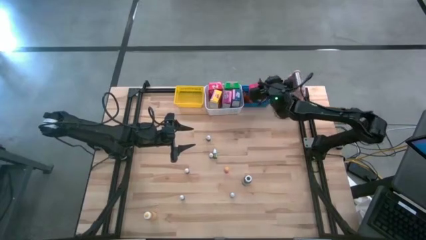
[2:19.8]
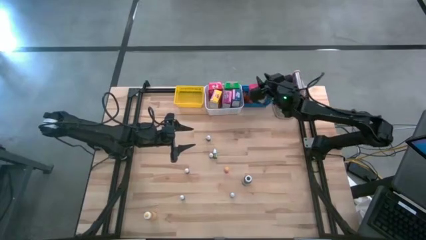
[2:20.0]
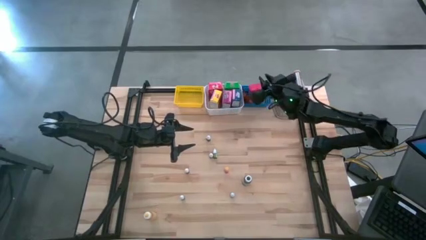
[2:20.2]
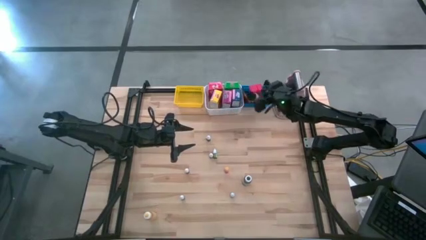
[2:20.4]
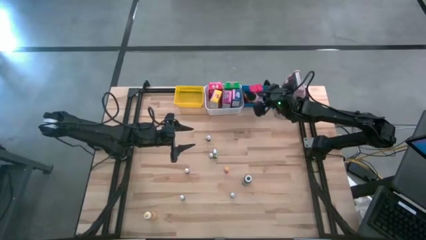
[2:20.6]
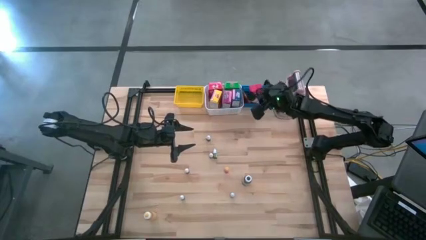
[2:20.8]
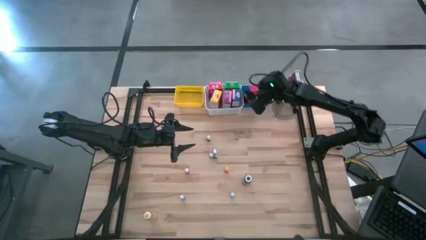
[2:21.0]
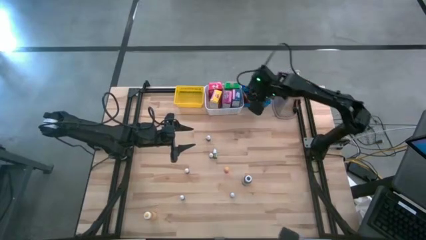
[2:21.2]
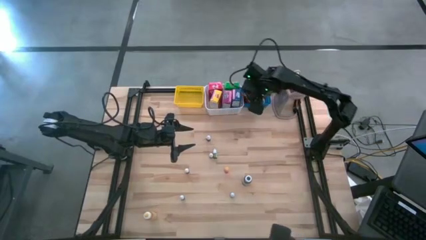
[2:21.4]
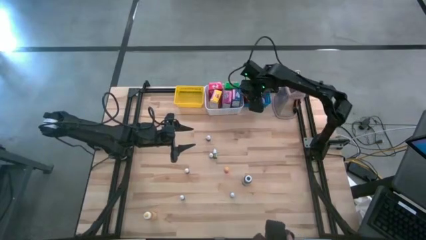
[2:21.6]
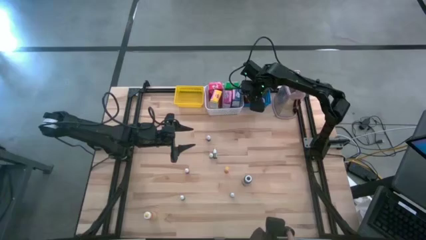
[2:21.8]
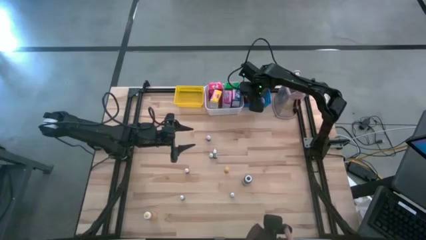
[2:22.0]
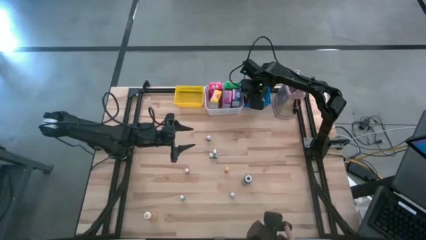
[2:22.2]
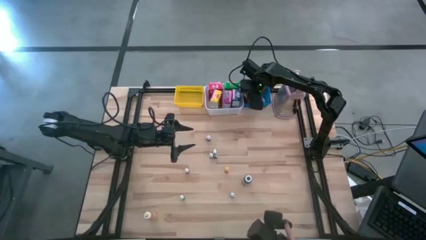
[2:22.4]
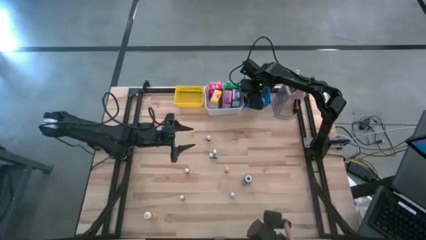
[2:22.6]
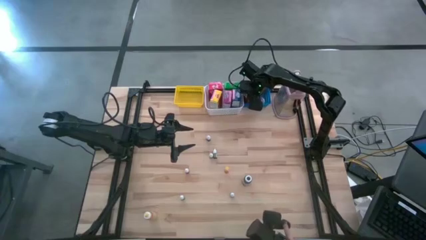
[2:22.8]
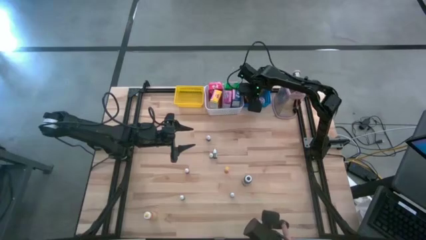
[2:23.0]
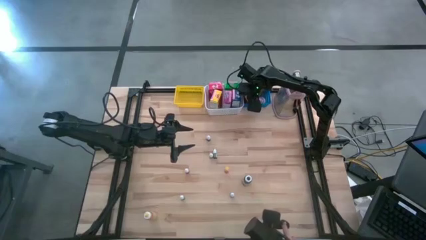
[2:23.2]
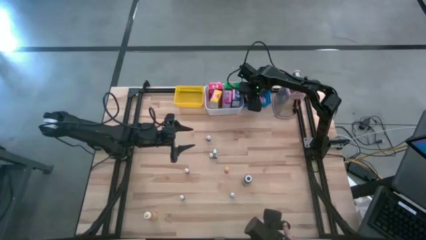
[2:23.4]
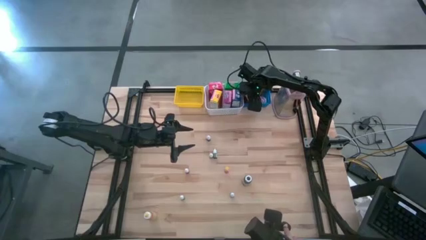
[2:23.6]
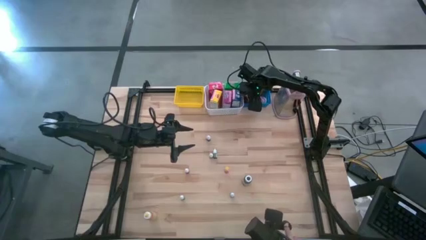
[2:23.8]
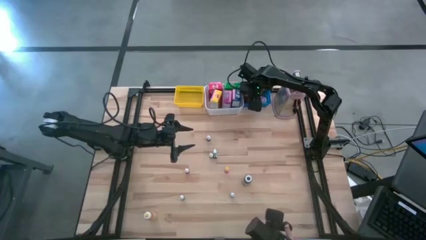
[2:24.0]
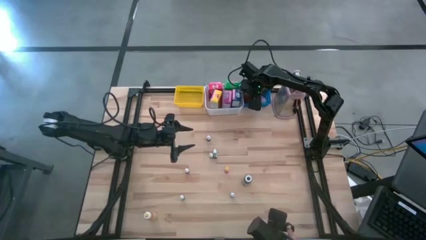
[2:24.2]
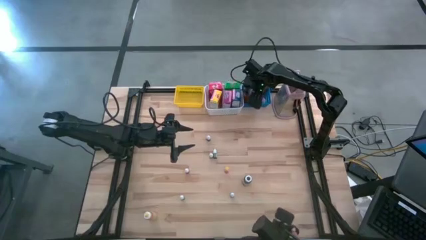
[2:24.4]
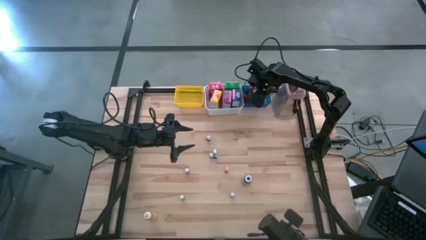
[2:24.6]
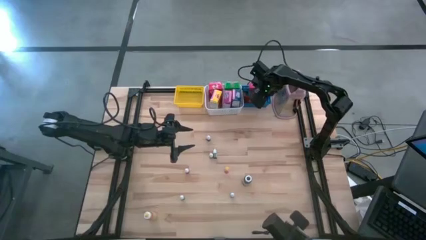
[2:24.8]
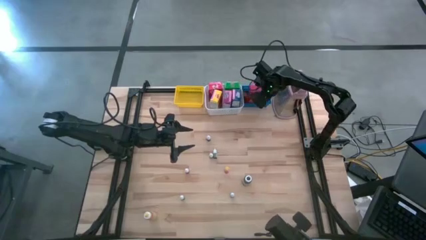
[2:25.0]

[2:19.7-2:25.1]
Task: Pick & Place Kitchen Items
Put the black seasoning bottle into the blue basket

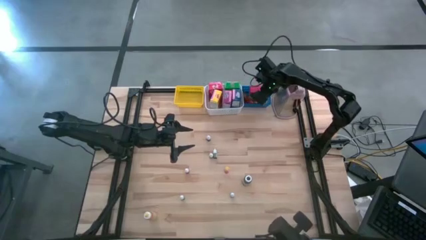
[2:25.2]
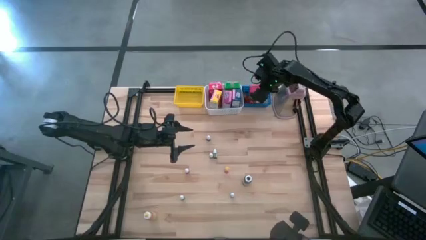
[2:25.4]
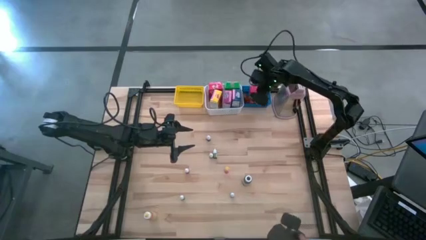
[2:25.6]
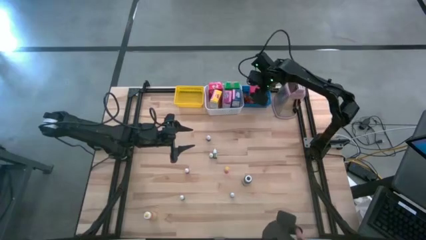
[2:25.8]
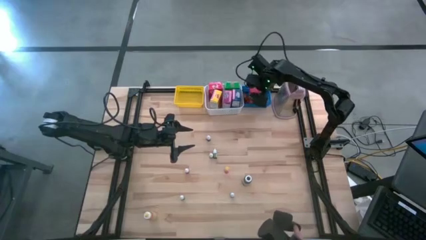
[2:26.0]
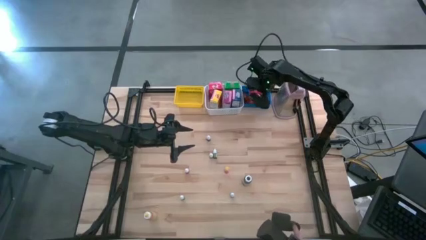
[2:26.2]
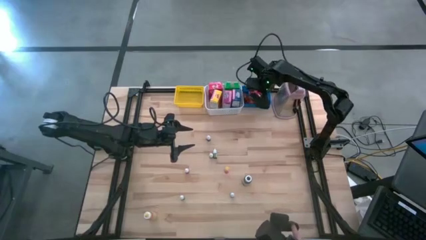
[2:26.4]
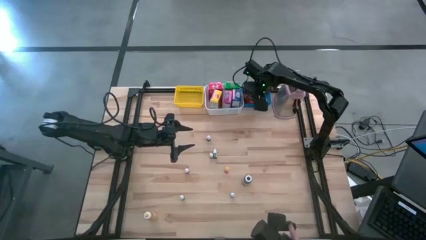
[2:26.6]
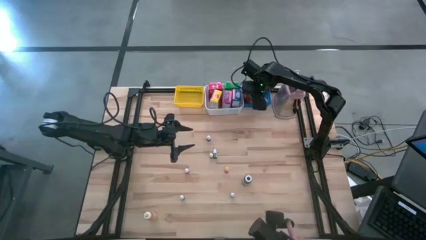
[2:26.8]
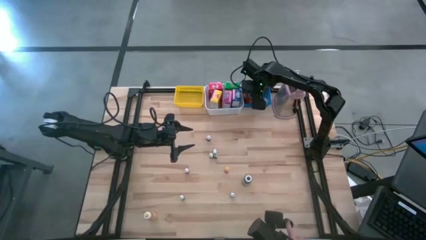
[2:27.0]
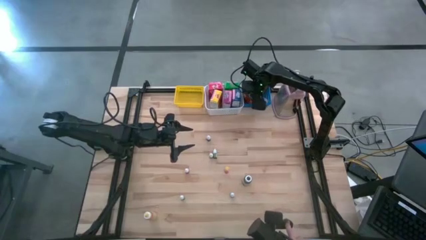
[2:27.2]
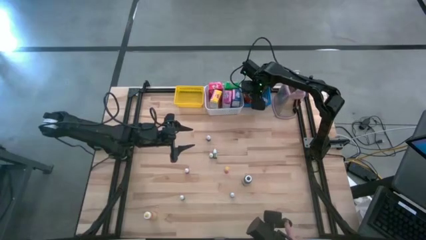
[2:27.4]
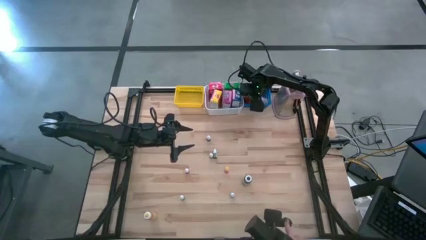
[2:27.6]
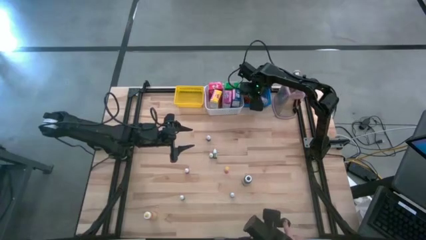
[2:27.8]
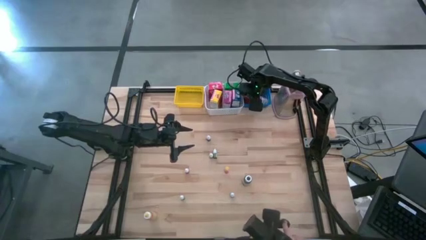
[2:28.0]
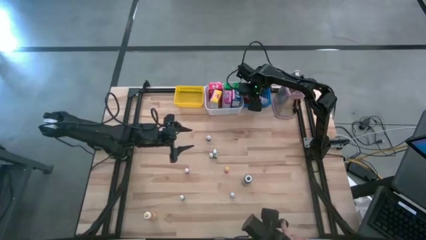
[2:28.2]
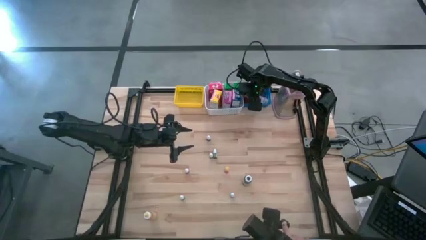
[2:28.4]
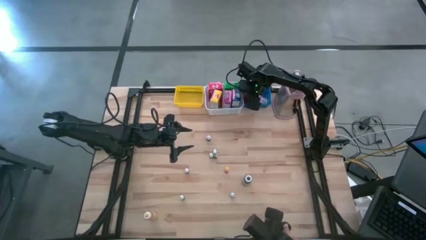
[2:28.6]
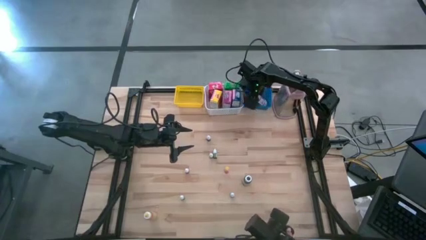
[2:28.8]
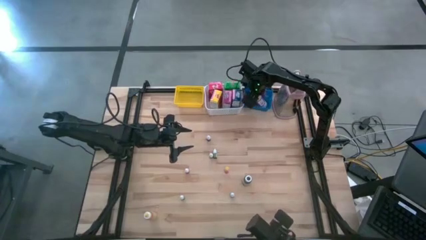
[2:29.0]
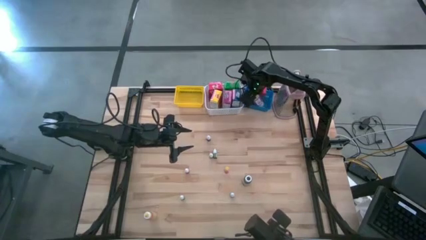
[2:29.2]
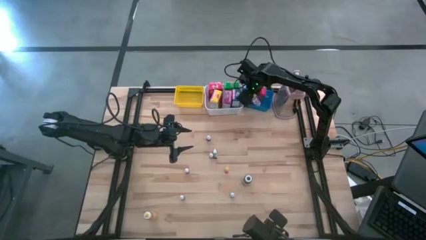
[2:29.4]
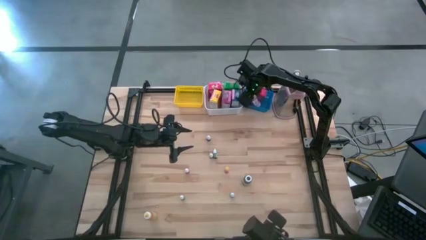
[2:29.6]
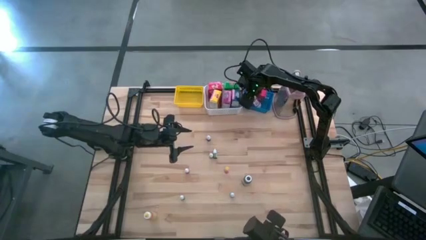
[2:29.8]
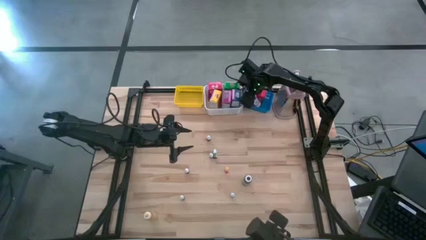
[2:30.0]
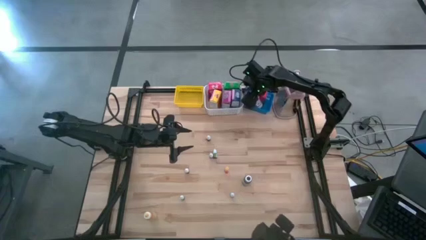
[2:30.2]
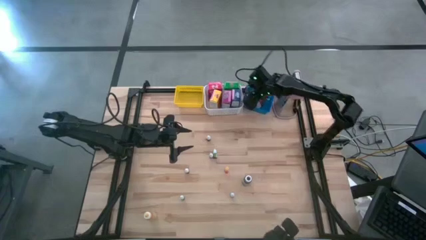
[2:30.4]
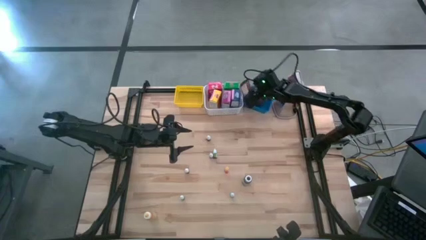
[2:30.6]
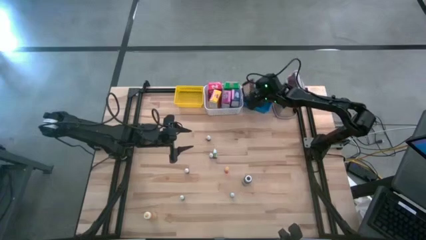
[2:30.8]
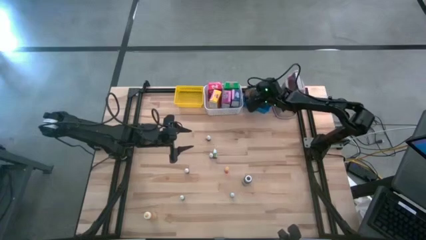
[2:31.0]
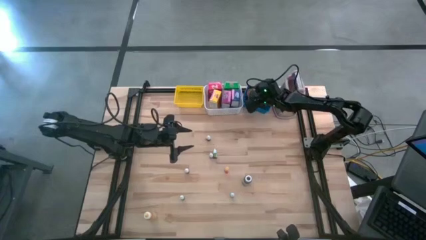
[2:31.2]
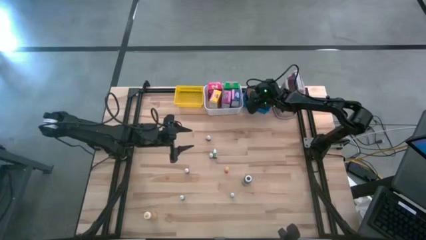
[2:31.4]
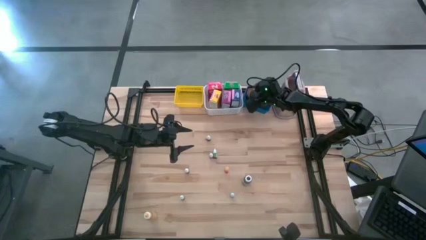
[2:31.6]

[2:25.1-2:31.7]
Put the black seasoning bottle into the blue basket

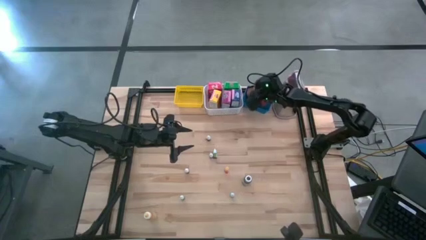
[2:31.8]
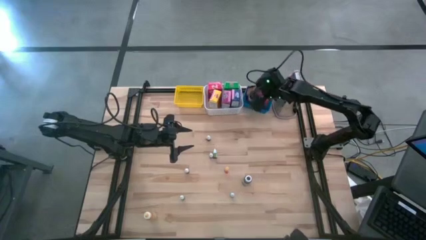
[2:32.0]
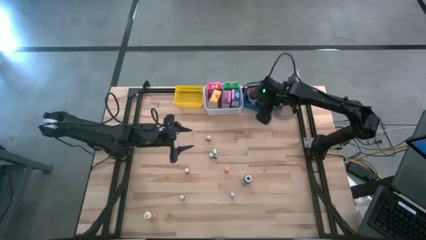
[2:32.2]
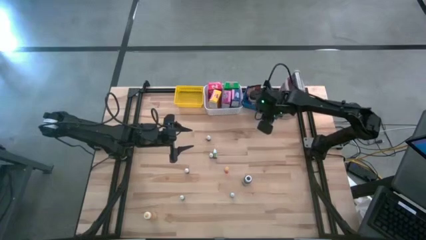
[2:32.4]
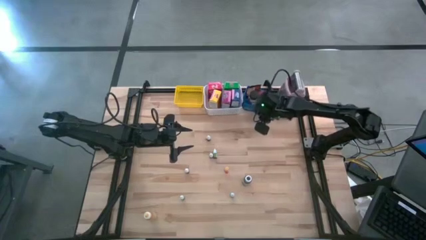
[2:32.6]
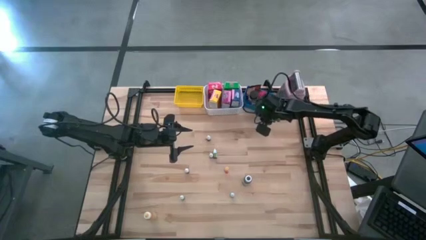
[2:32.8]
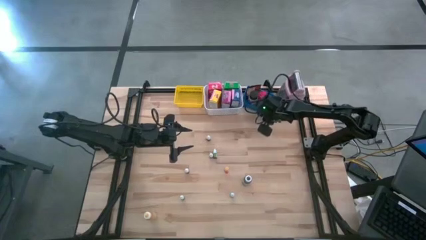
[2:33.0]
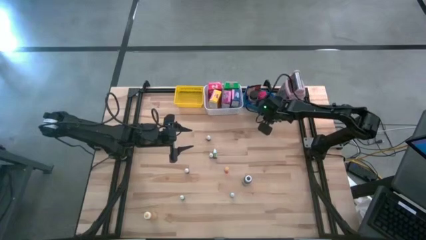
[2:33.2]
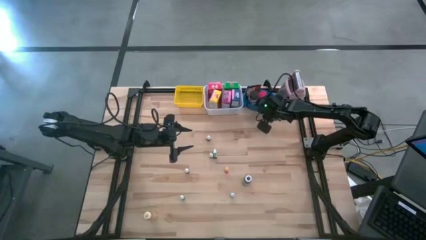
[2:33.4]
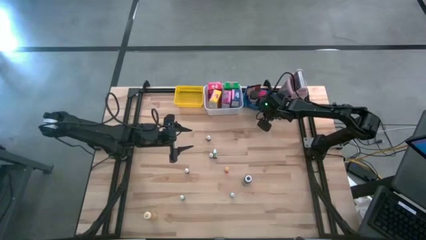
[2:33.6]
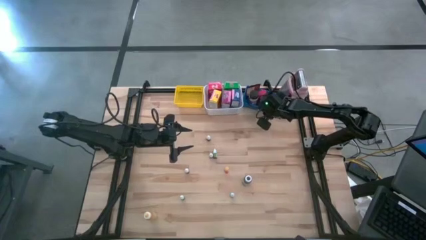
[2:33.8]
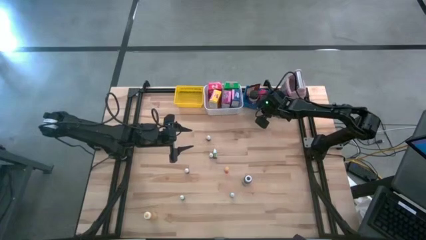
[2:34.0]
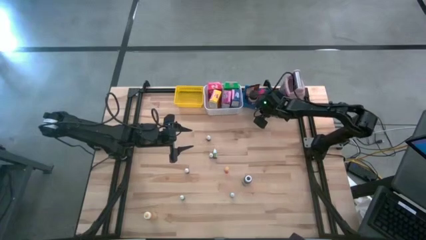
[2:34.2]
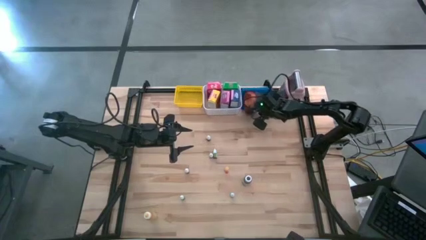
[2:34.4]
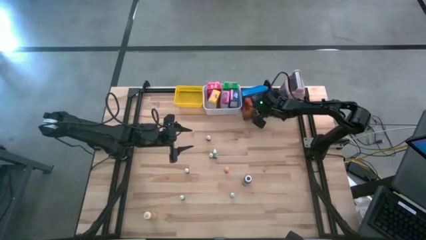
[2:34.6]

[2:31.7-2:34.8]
Adjust the blue basket on the table
